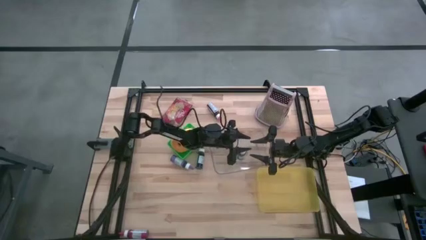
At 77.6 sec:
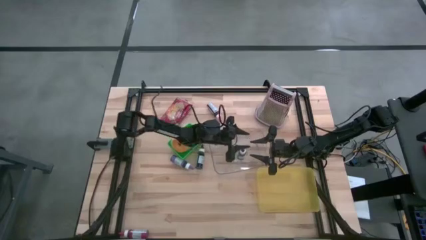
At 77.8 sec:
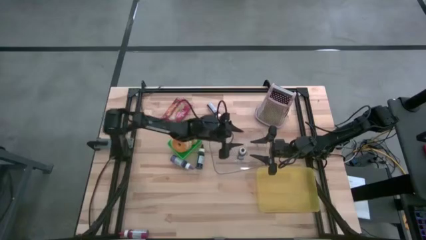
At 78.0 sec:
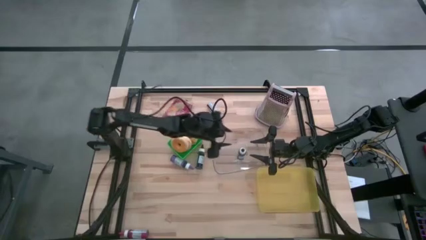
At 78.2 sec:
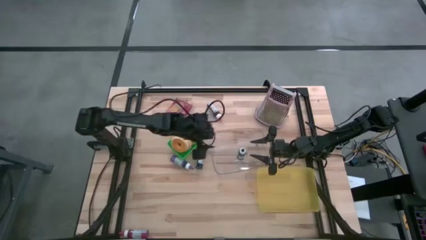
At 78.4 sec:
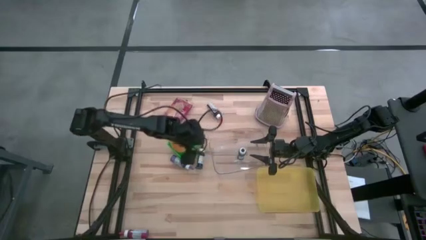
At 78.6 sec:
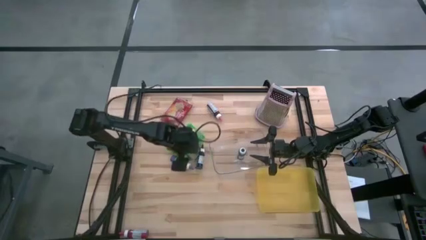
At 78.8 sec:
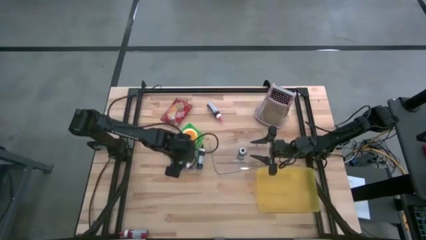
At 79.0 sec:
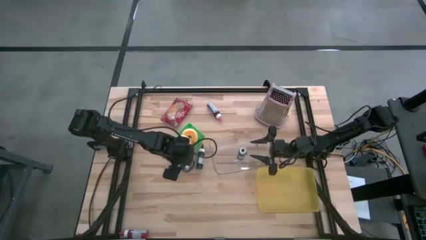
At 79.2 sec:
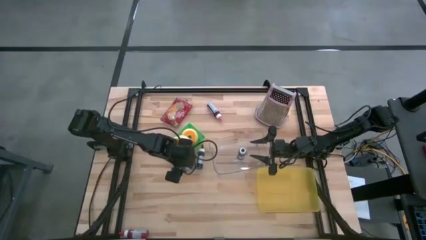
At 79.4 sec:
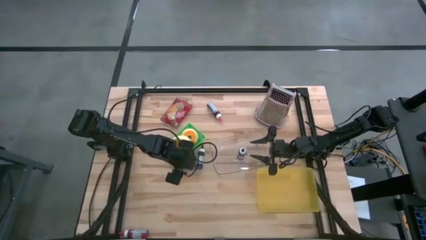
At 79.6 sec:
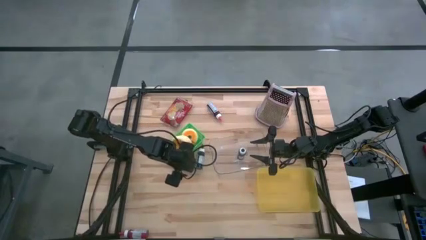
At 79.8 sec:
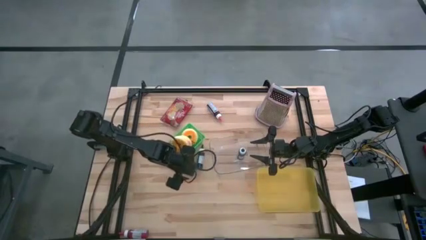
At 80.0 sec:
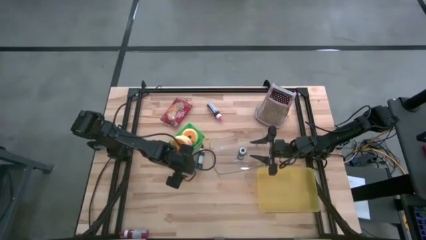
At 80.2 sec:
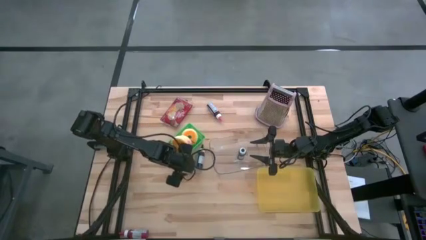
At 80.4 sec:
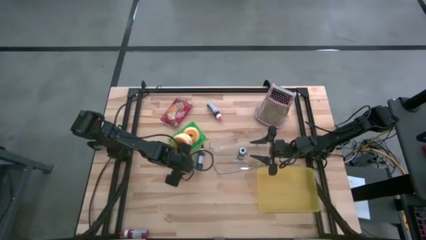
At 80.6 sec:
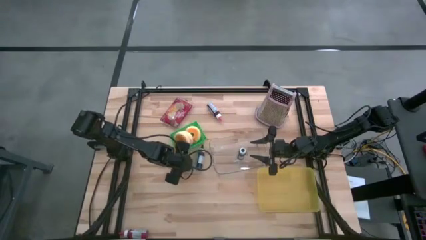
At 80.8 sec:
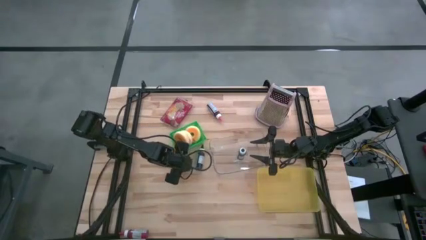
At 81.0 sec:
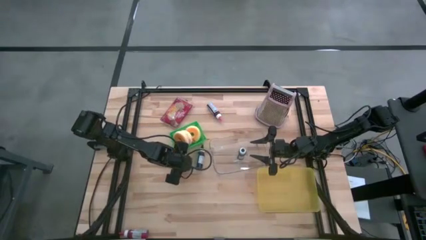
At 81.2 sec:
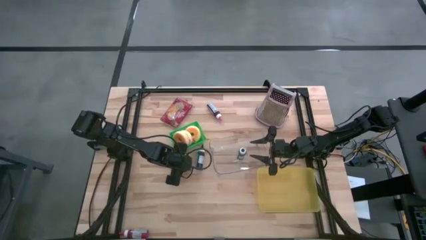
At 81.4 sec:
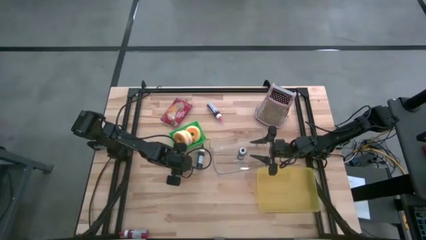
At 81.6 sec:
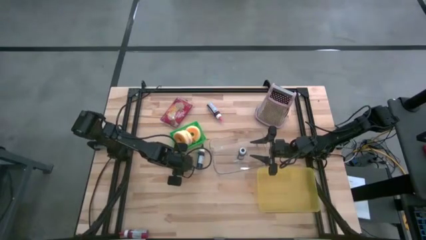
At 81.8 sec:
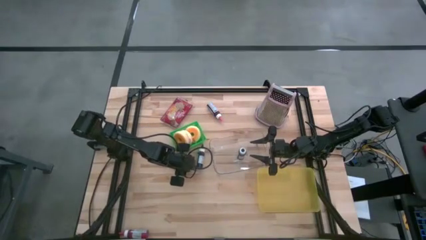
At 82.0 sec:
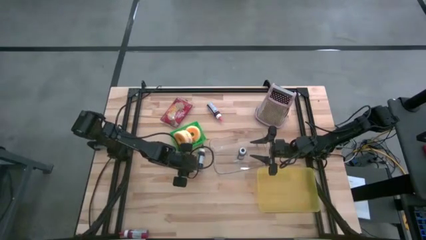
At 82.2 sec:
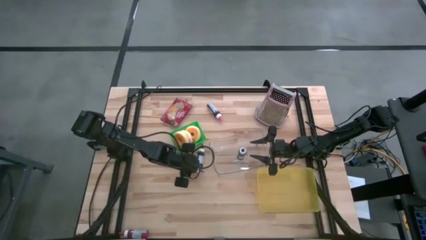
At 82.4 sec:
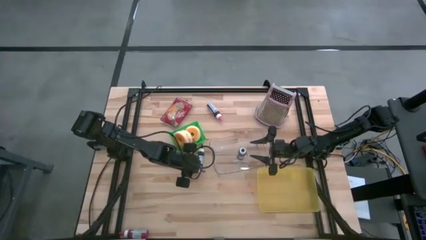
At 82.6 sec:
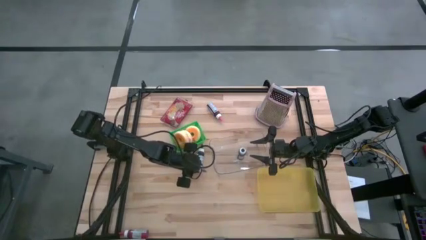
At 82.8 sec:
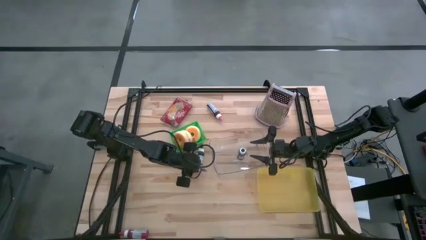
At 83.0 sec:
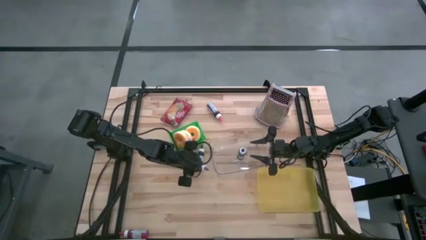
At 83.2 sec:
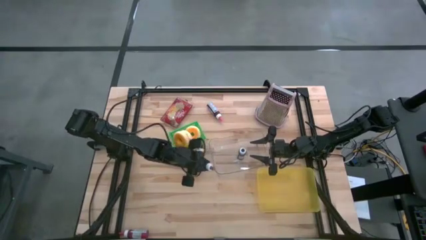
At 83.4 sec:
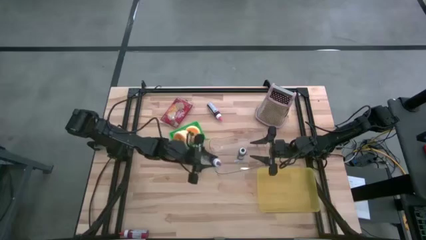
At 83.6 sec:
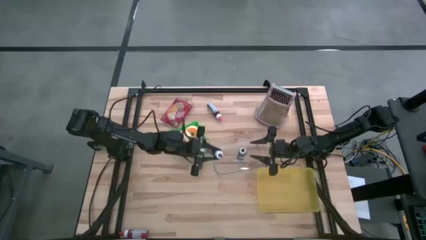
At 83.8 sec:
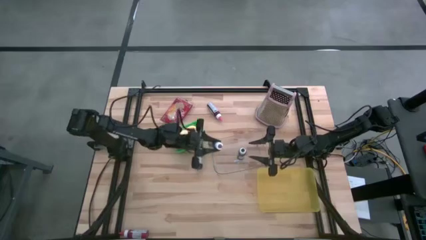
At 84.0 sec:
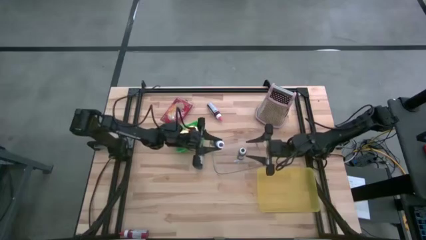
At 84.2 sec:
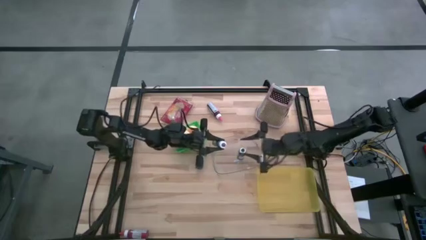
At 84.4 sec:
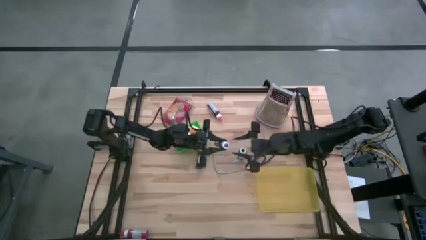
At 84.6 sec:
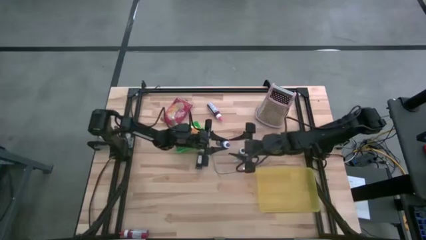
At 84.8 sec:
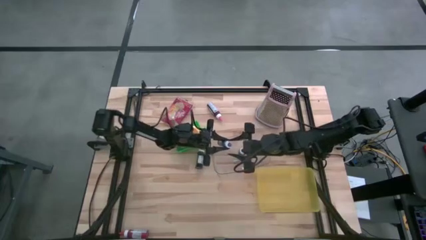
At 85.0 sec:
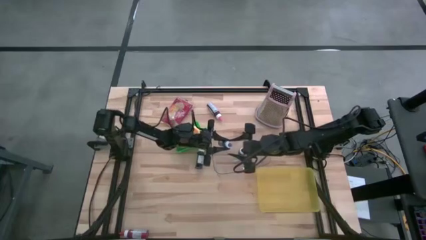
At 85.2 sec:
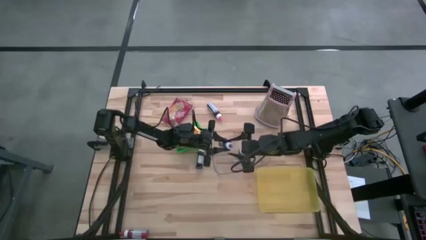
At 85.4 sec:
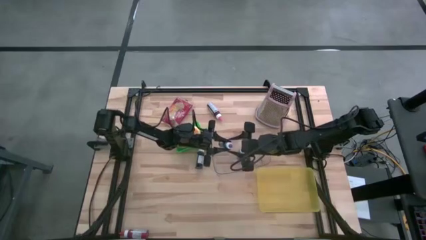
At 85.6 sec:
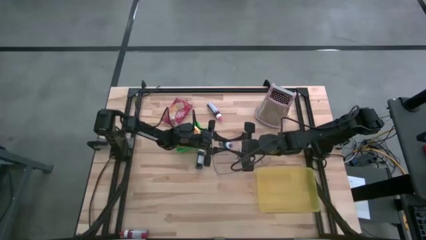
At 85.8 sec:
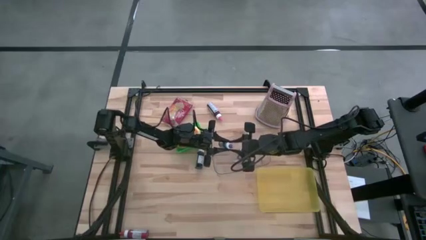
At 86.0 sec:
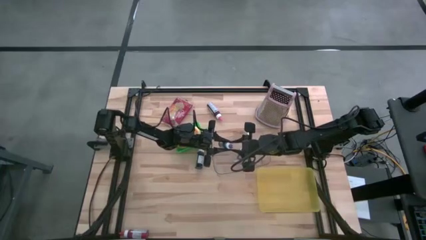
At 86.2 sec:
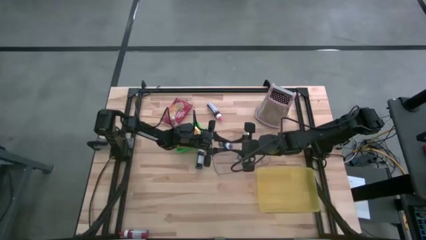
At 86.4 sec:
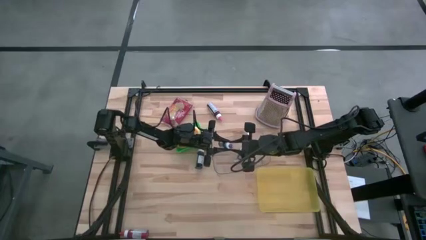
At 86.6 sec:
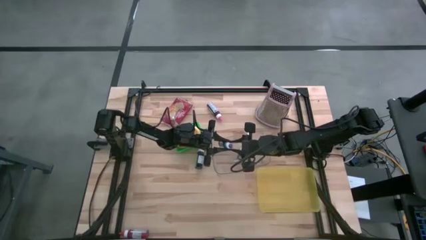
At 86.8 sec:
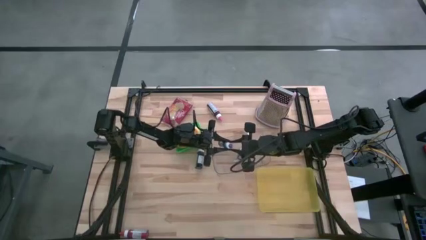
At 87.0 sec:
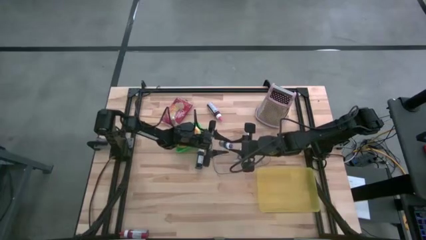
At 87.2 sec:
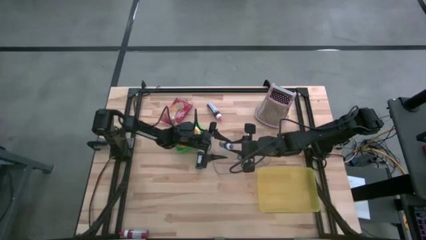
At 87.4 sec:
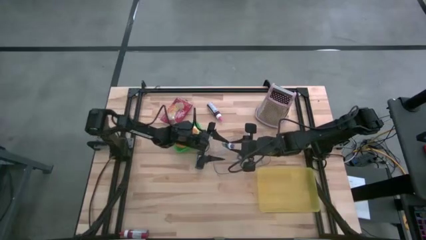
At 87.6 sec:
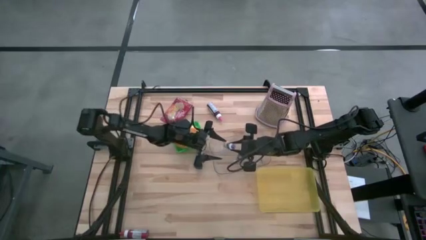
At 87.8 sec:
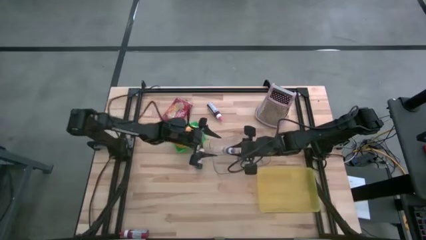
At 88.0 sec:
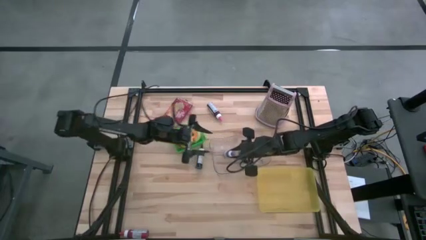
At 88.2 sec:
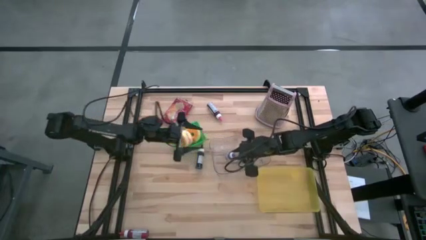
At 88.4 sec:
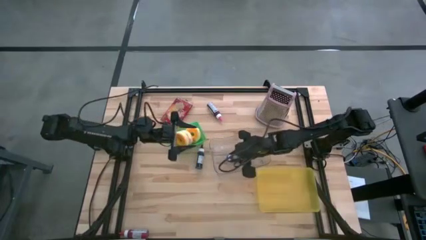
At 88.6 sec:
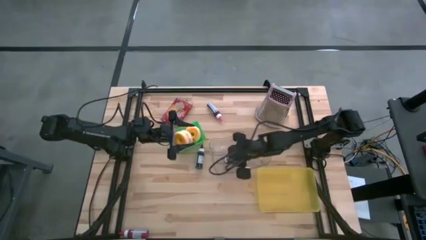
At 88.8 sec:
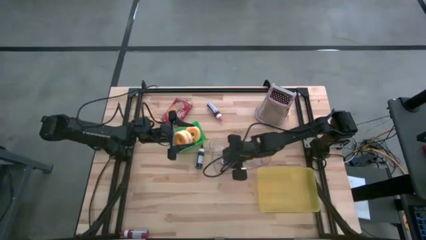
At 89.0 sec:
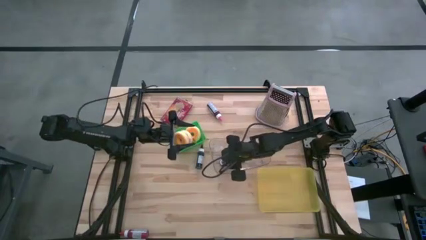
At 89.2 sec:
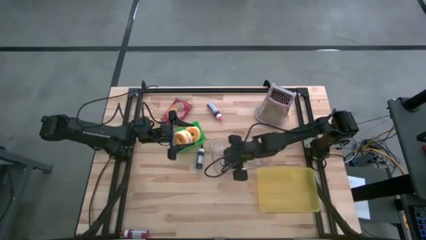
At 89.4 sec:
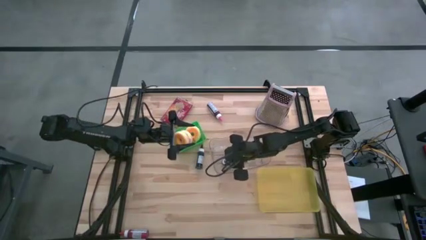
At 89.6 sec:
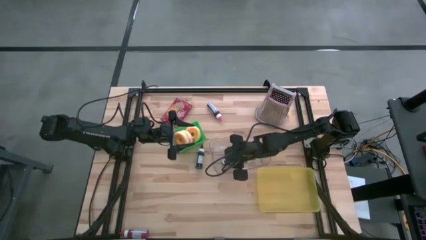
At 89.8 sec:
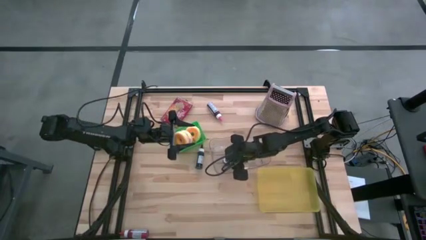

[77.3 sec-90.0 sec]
Task: Pick & Place Food Item
Put the purple food coloring bottle into the transparent bin

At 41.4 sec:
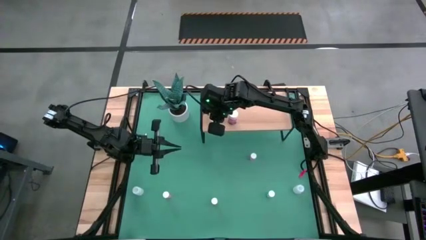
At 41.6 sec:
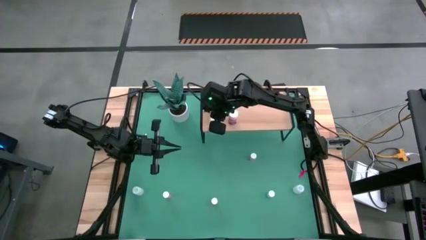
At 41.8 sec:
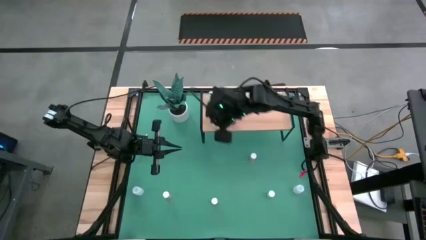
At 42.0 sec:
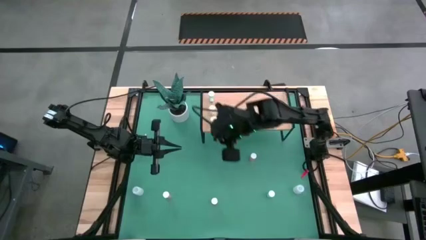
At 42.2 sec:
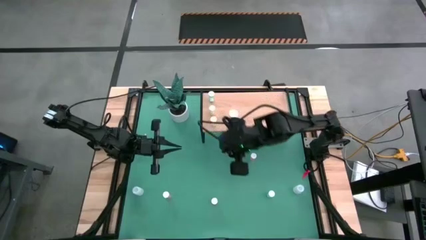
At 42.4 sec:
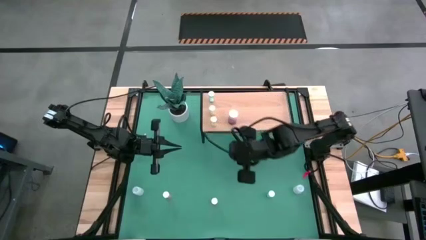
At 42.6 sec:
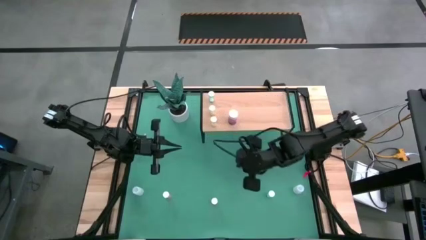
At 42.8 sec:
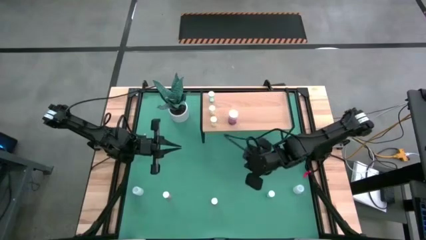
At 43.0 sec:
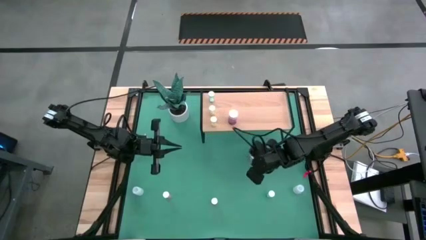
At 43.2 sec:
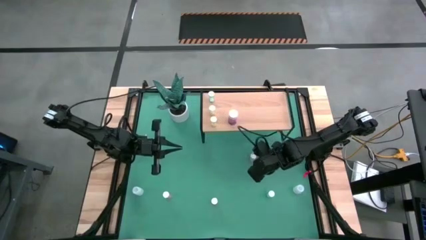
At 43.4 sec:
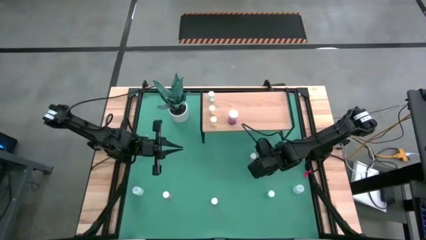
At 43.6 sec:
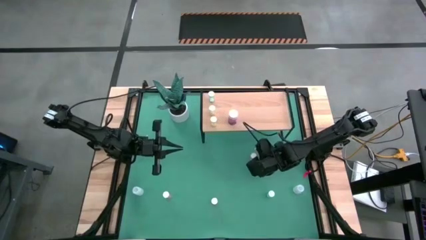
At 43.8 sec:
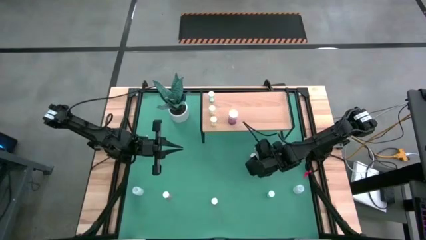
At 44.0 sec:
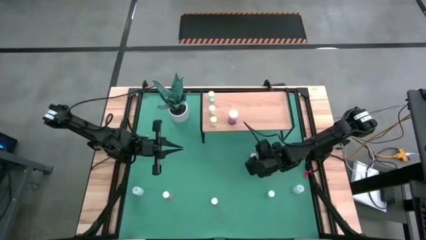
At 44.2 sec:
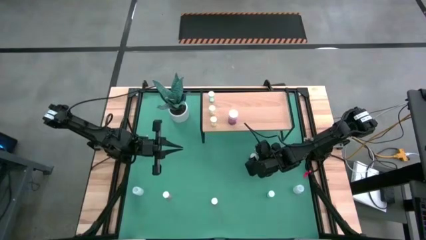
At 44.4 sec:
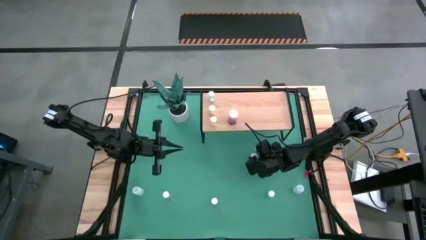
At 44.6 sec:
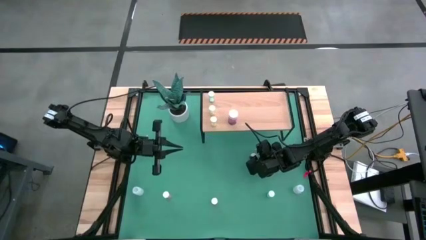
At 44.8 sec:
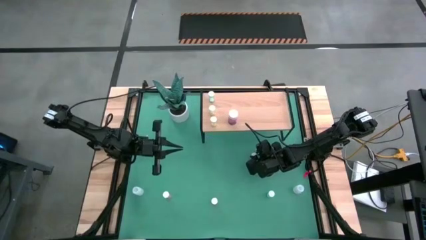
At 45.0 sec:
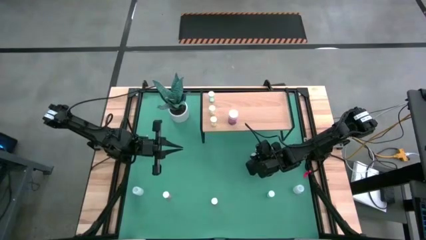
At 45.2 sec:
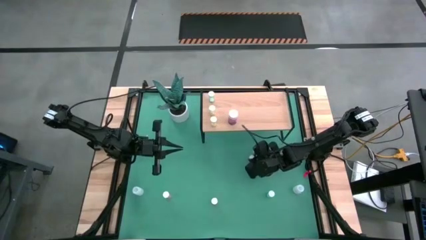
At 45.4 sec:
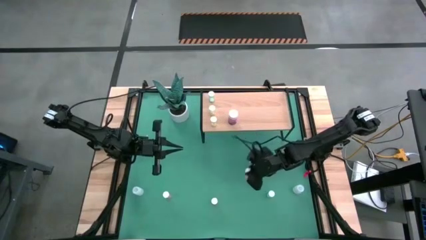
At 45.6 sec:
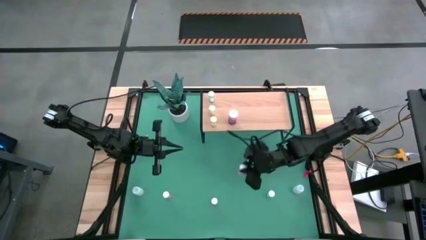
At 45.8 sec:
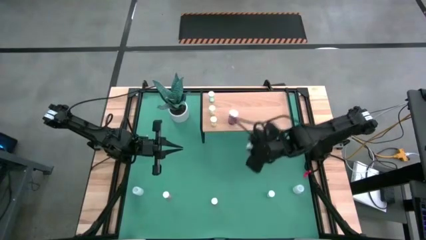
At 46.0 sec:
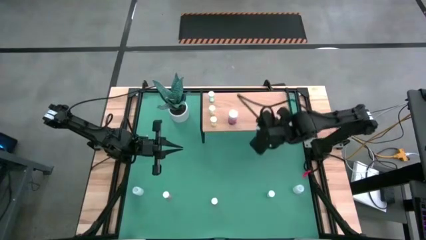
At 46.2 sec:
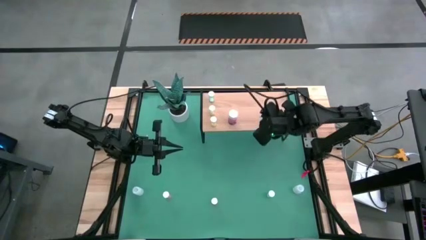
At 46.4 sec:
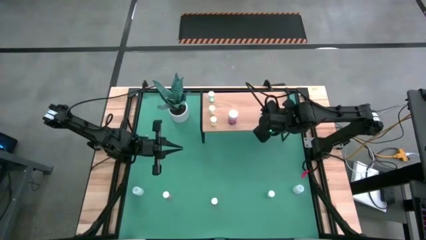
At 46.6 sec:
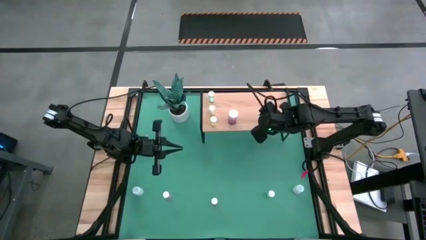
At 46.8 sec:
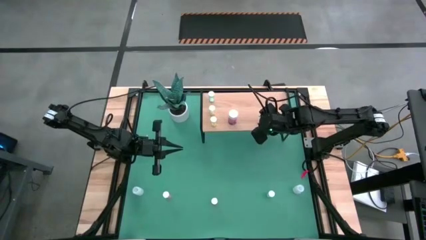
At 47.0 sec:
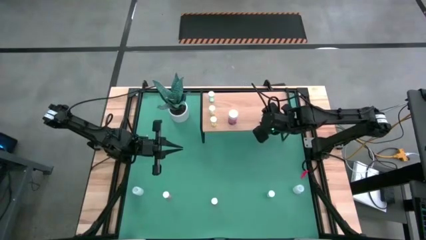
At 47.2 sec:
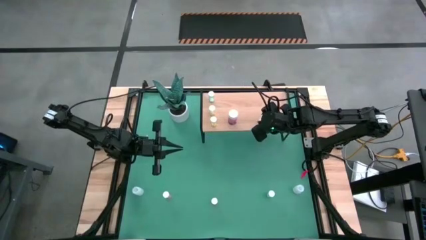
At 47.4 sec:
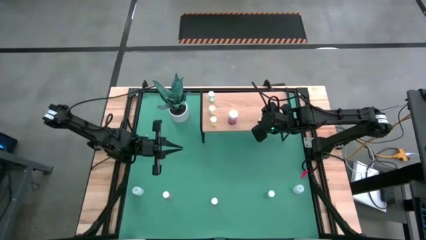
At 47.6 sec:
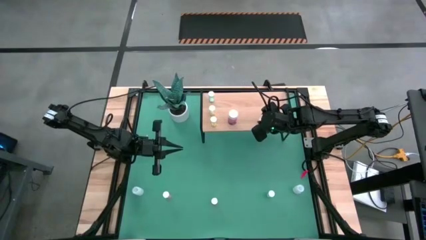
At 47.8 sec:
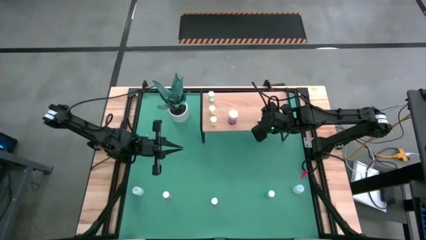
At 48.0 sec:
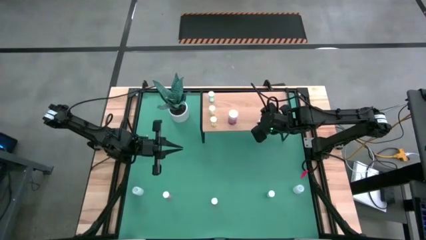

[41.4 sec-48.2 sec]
Task: Pick and place medicine bottles onto shelf by color
Put the top light pink pill bottle on the shelf
